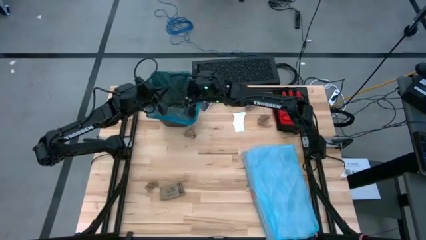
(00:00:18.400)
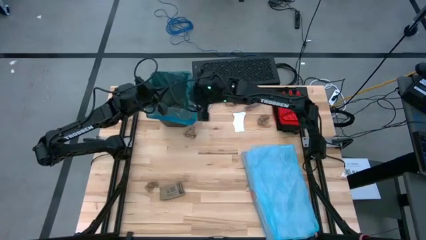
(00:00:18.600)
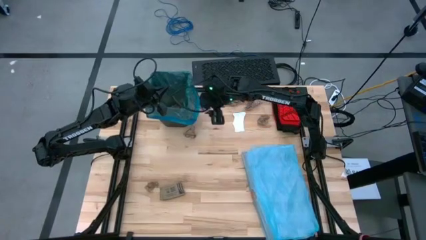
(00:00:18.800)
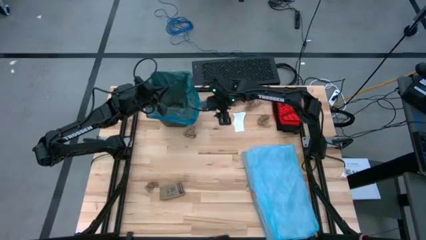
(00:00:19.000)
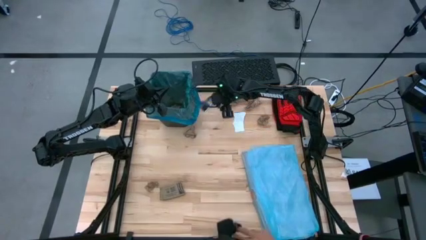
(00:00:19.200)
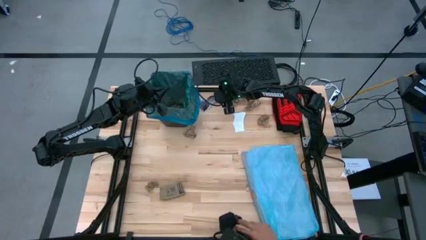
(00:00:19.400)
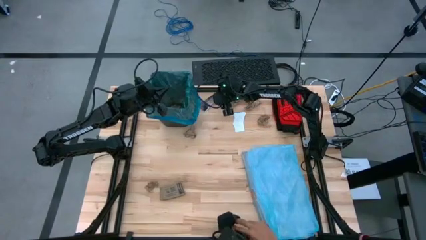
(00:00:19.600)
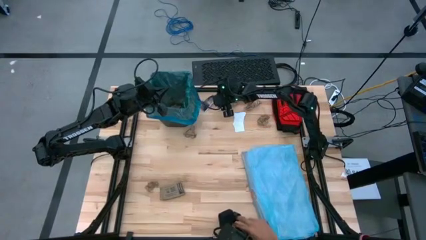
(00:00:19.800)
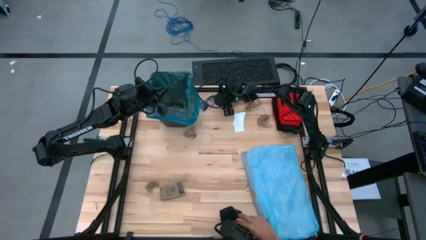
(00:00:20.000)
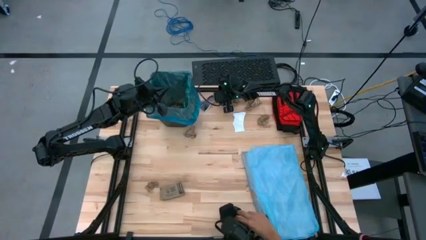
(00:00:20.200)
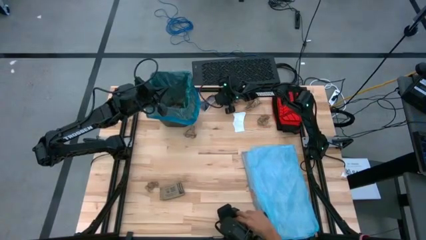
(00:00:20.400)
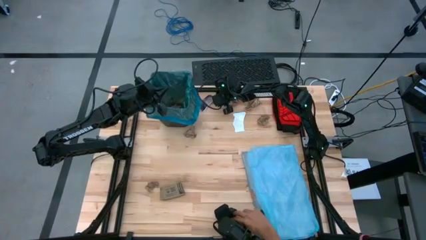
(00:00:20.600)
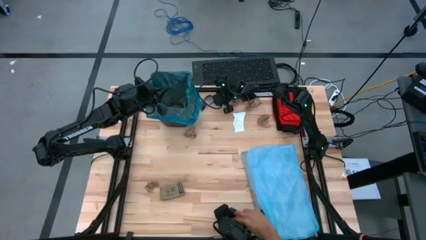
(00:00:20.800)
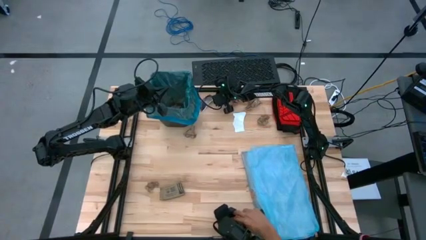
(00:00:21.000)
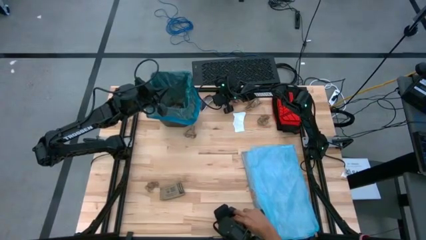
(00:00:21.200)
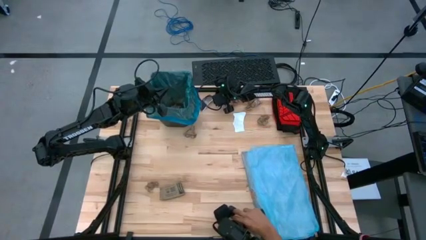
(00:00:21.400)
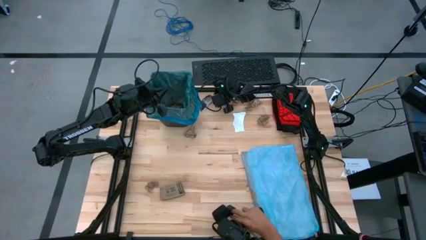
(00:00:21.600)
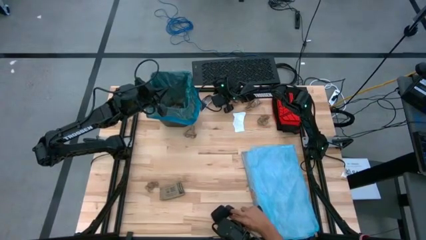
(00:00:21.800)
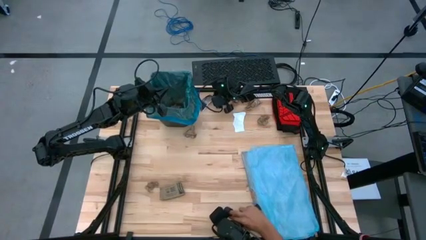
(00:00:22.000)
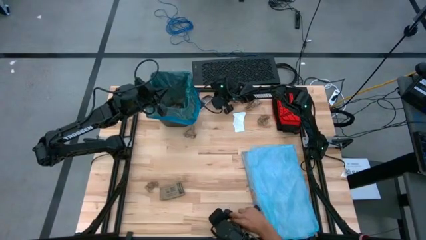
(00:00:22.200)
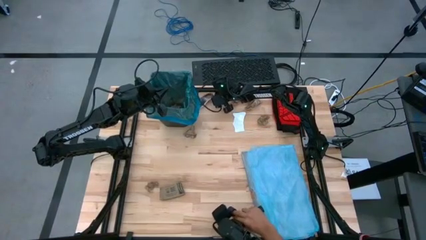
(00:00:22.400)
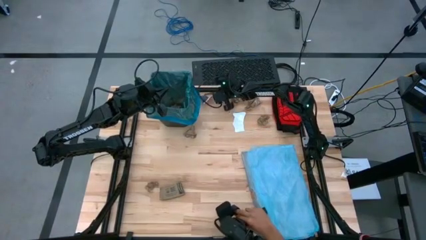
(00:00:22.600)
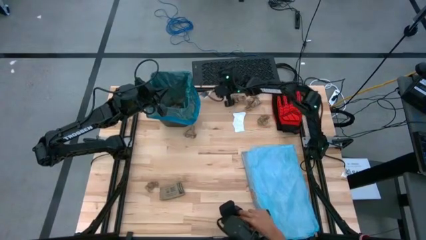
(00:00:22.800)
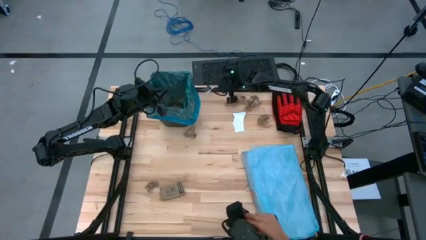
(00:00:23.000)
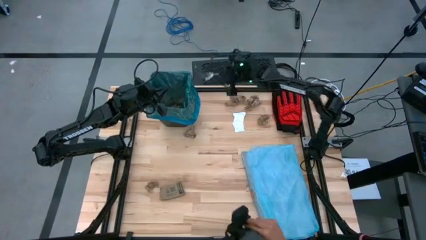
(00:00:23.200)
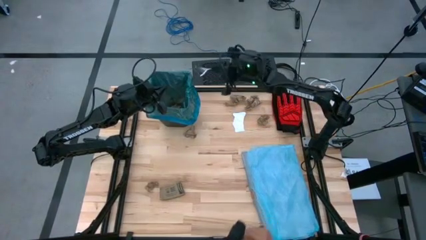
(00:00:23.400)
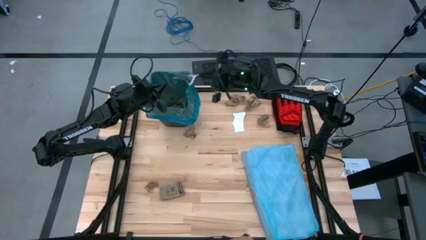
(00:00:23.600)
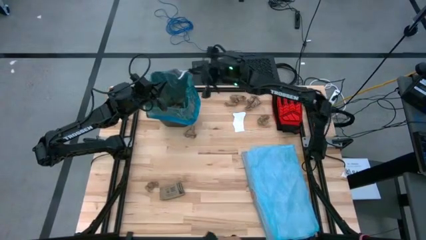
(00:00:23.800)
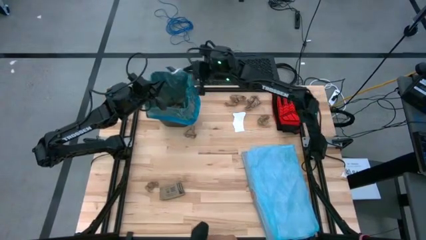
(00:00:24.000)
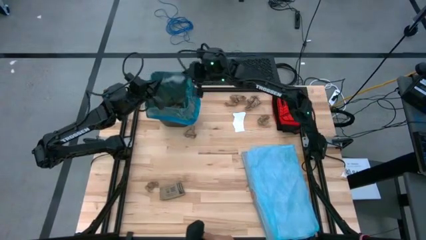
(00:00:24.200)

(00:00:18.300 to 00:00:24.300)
Task: place trash/remove bag and relplace
Put the black paper into the trash bin

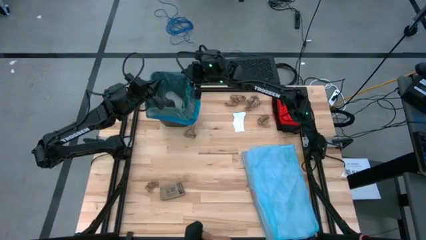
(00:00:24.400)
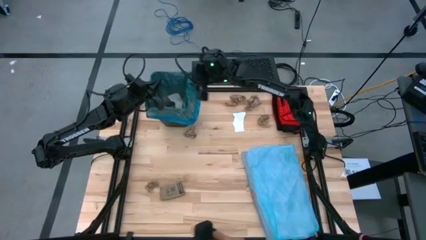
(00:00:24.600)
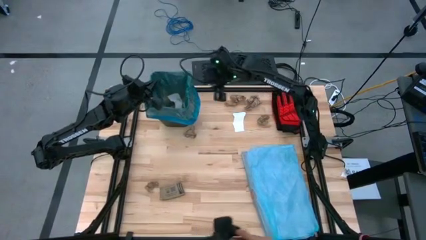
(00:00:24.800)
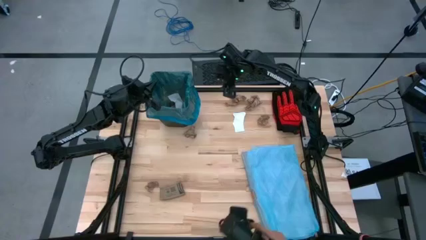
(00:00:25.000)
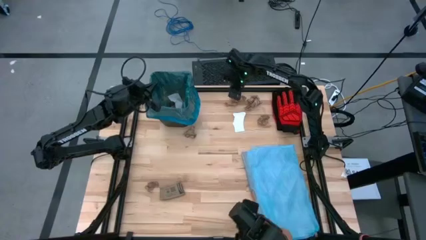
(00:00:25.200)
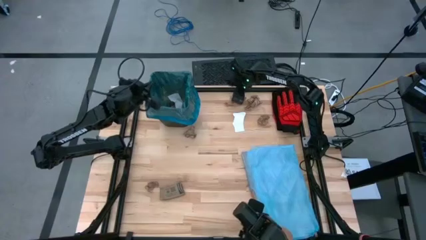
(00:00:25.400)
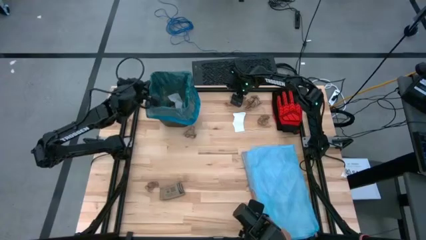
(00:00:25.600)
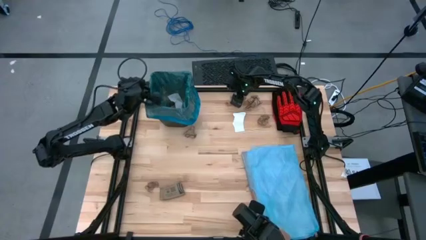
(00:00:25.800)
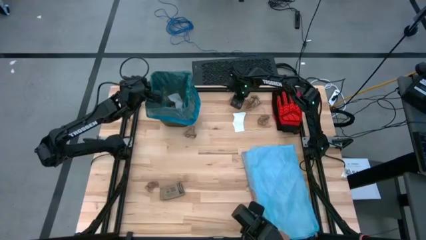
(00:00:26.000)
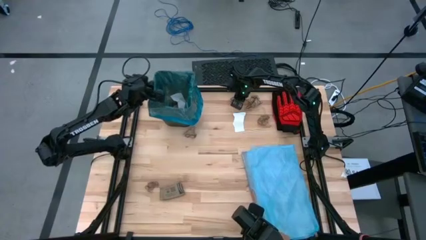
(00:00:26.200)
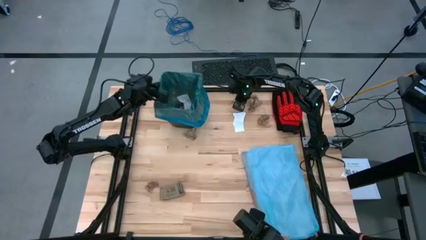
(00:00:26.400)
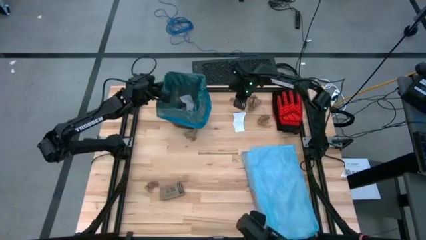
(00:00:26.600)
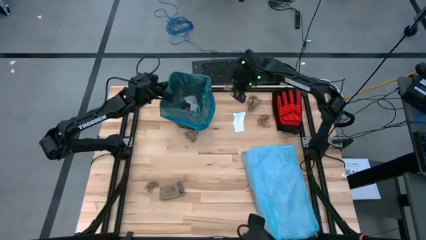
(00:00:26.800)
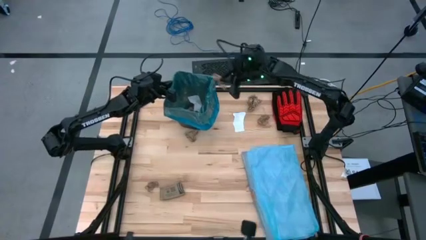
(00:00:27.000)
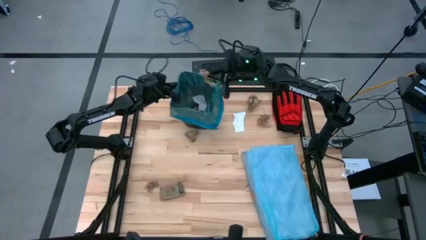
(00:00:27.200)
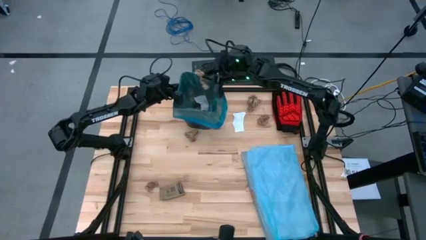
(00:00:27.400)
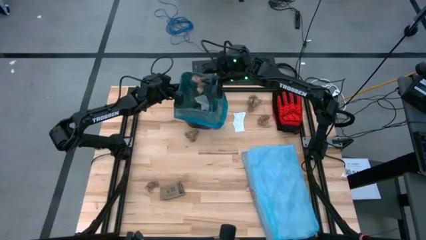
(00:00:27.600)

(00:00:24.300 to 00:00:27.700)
Put the brown napkin into the trash bin

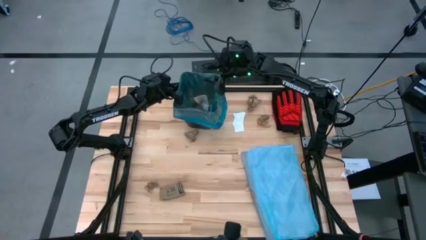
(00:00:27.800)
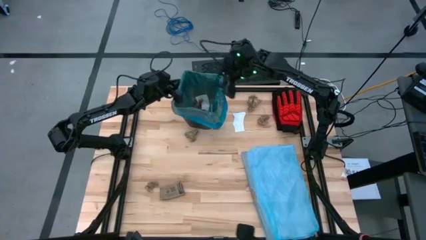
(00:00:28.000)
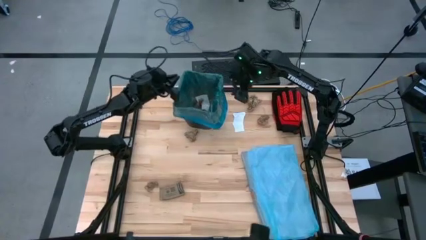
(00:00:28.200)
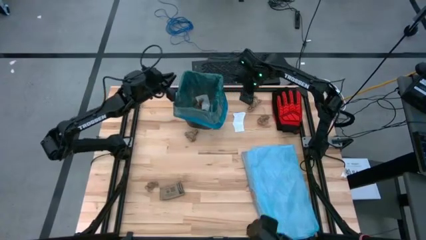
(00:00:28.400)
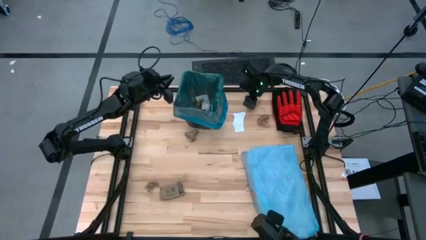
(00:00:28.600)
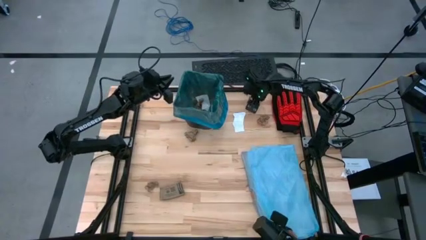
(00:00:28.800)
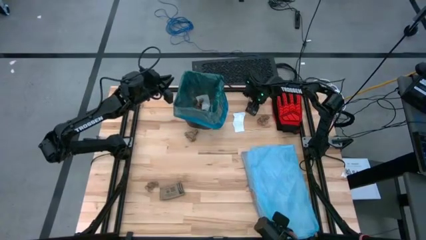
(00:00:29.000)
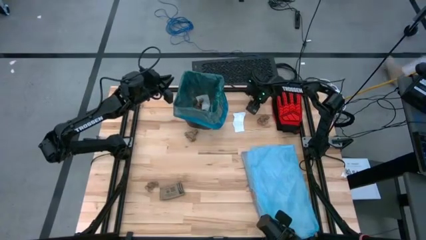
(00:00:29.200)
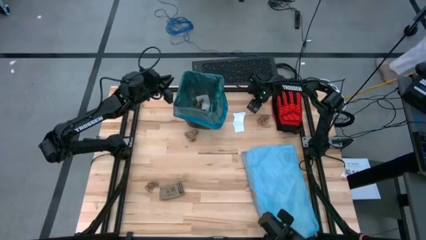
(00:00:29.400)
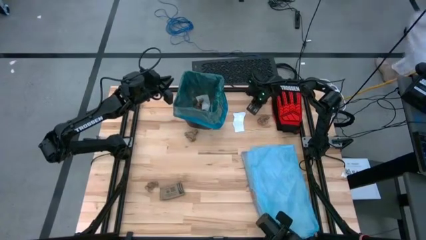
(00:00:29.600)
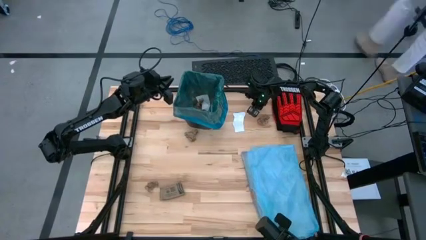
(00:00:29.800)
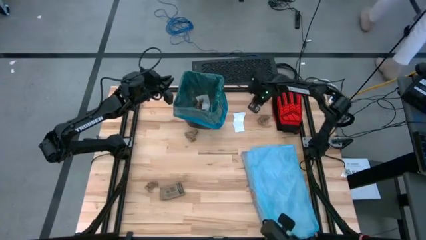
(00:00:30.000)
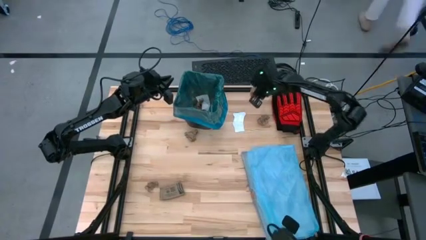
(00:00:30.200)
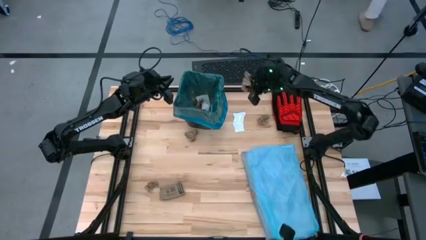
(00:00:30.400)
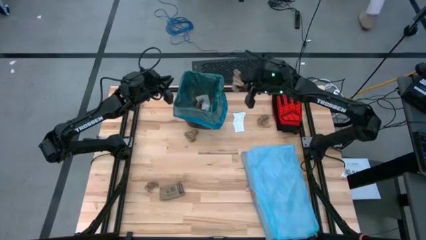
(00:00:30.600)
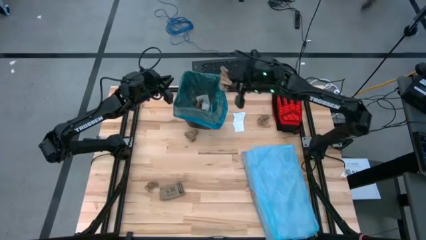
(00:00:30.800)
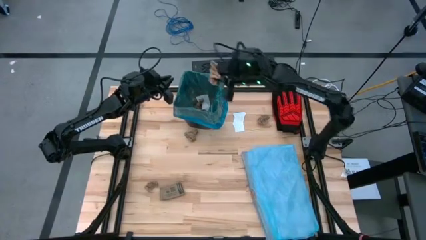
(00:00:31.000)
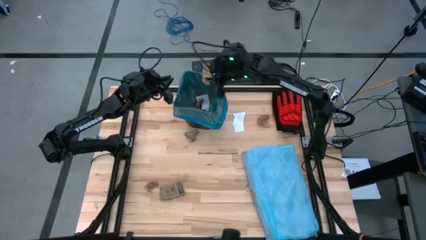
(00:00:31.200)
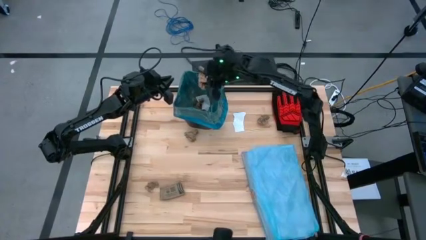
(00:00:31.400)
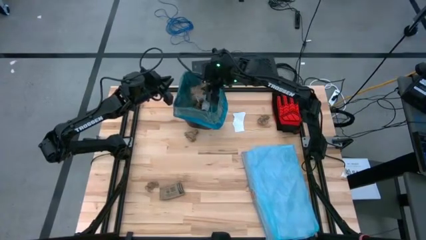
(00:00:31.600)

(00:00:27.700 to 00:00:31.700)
Put the brown napkin into the trash bin

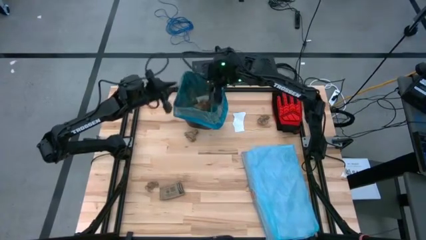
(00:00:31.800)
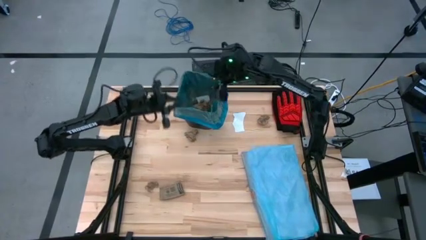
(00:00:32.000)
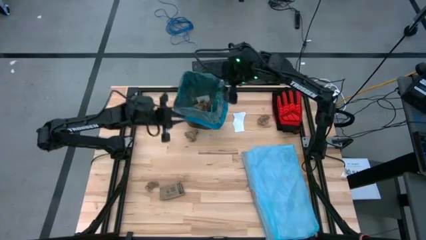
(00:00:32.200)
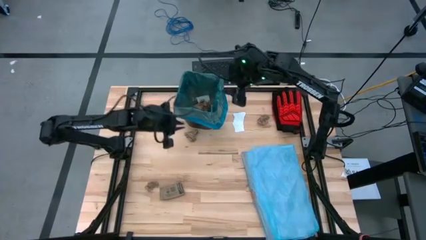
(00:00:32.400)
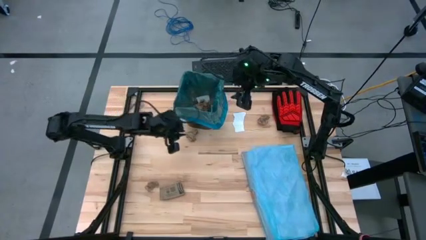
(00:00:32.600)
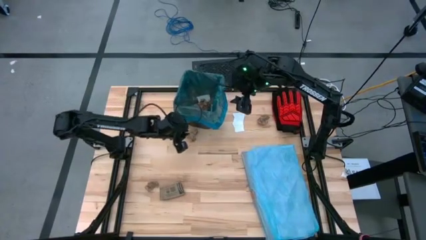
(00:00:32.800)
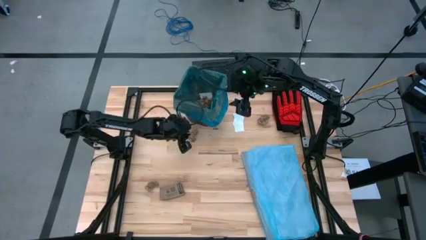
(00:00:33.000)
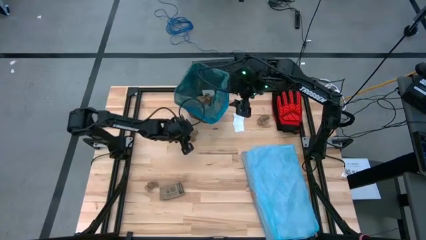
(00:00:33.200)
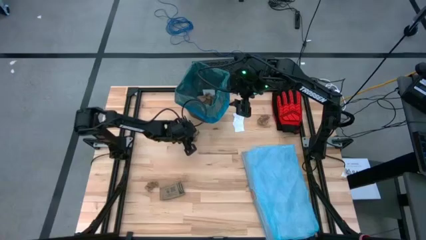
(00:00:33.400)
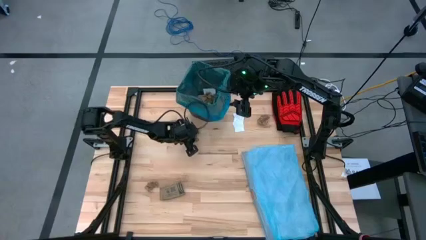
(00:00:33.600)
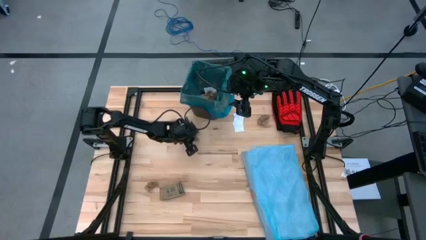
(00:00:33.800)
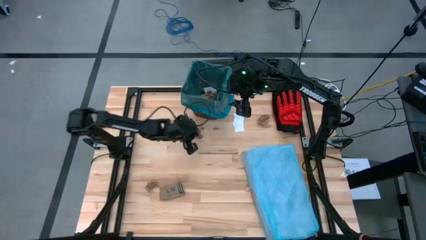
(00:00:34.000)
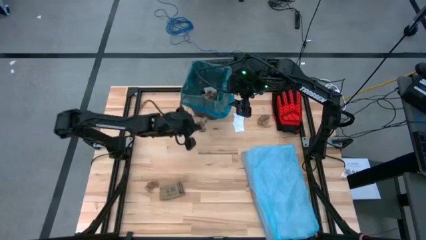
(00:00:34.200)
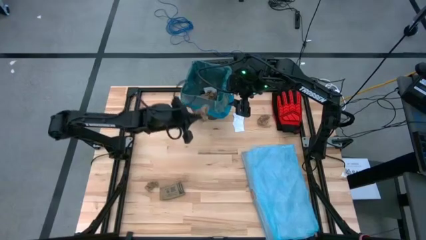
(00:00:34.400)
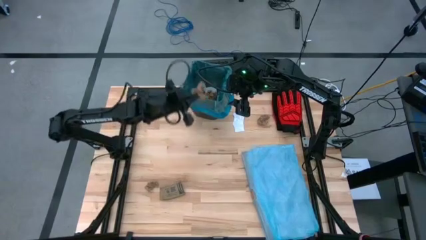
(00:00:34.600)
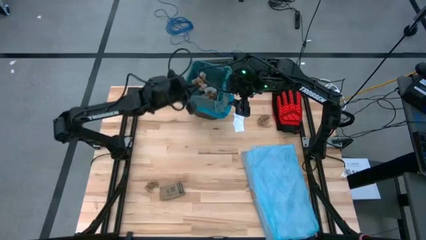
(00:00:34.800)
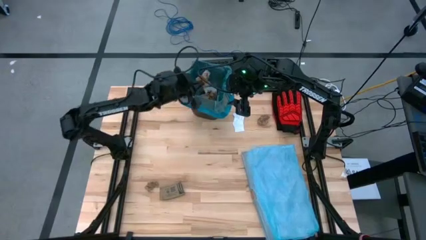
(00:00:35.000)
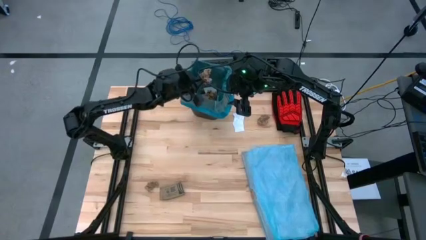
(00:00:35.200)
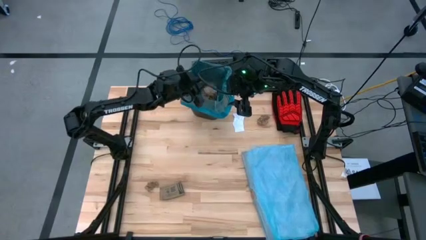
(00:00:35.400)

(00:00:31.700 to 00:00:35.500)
Put the brown napkin into the trash bin
